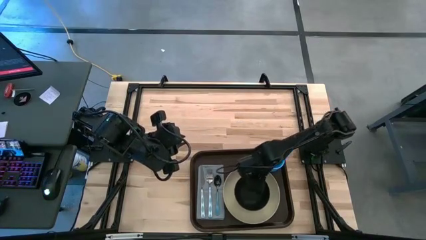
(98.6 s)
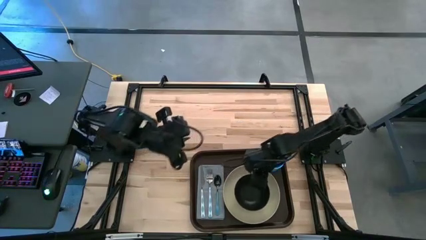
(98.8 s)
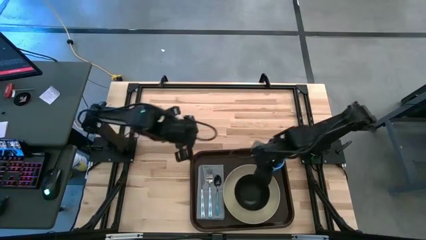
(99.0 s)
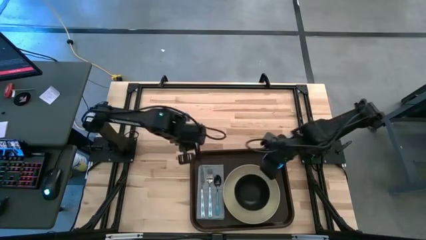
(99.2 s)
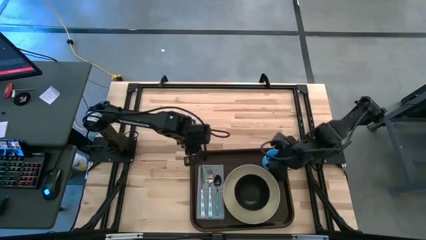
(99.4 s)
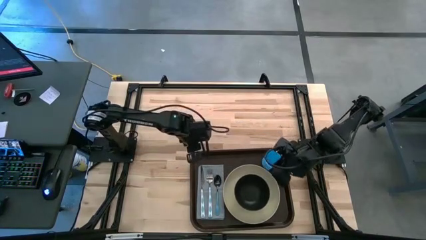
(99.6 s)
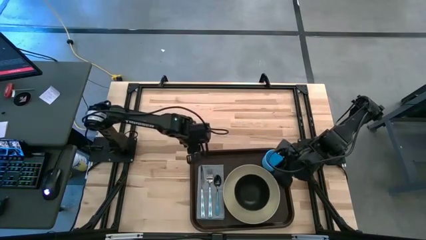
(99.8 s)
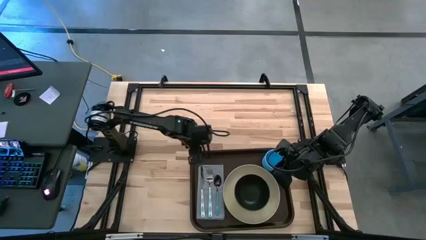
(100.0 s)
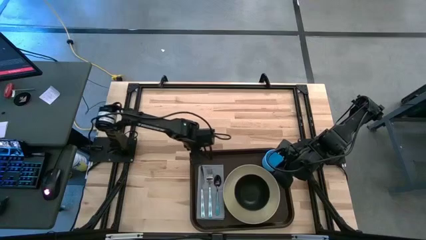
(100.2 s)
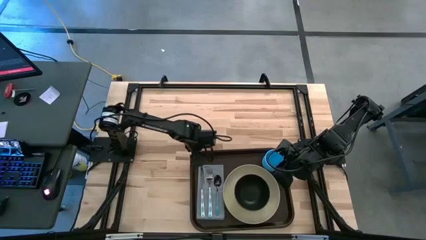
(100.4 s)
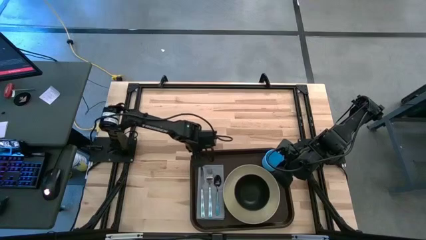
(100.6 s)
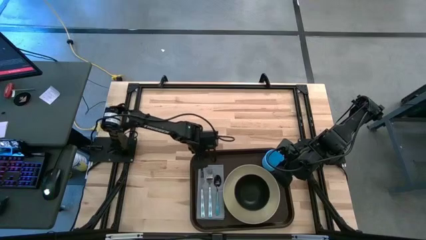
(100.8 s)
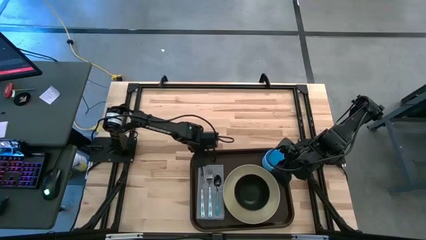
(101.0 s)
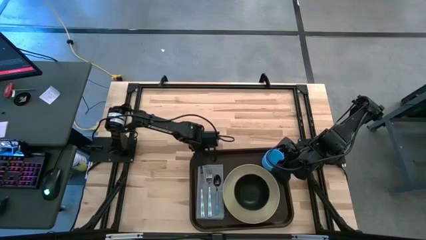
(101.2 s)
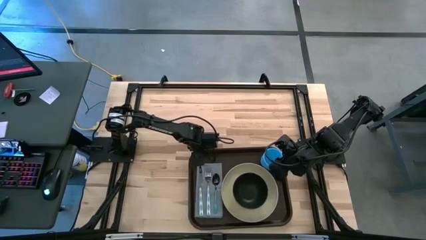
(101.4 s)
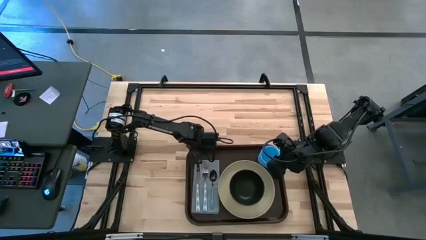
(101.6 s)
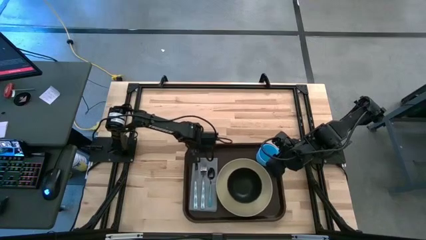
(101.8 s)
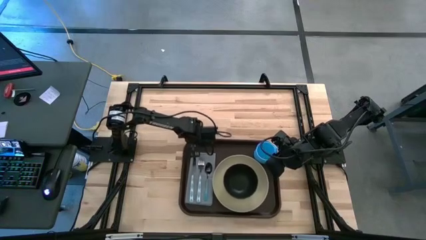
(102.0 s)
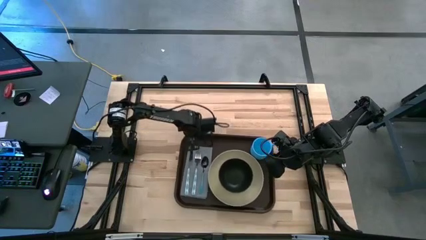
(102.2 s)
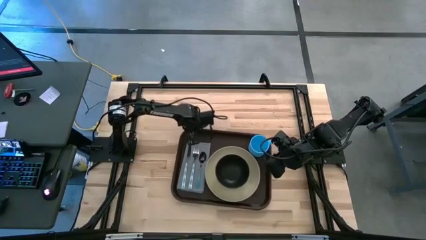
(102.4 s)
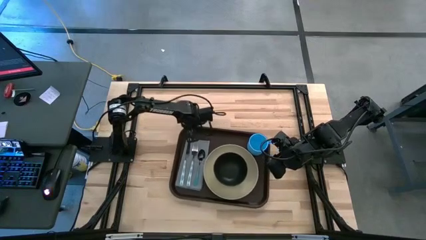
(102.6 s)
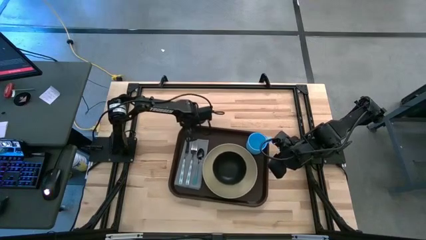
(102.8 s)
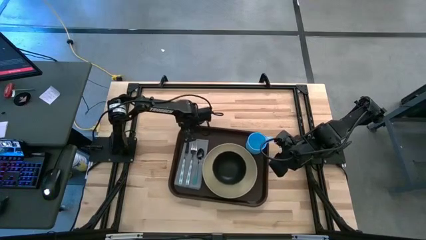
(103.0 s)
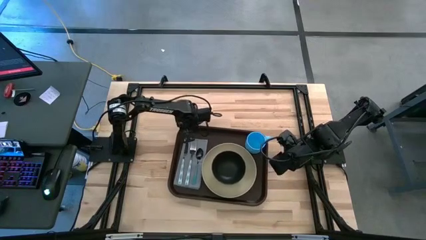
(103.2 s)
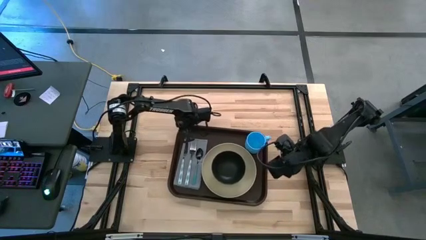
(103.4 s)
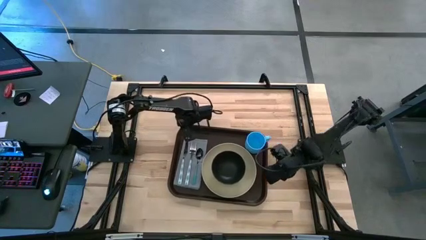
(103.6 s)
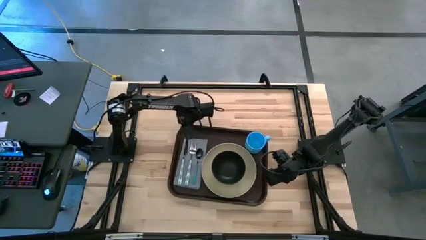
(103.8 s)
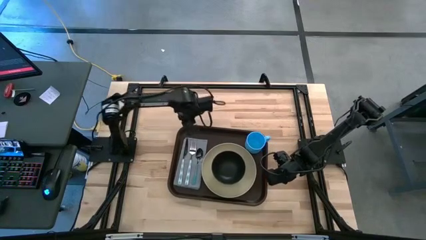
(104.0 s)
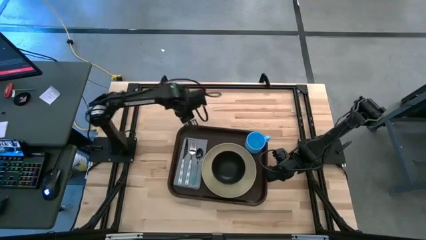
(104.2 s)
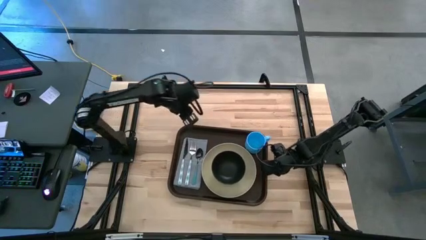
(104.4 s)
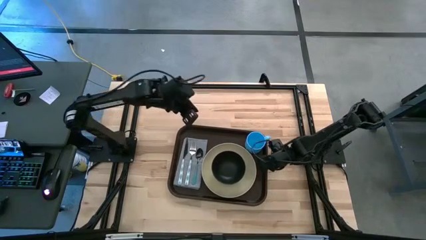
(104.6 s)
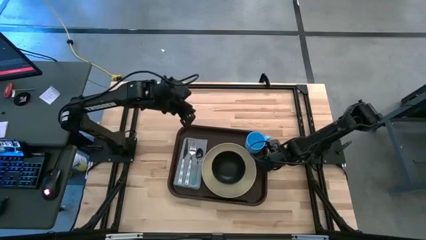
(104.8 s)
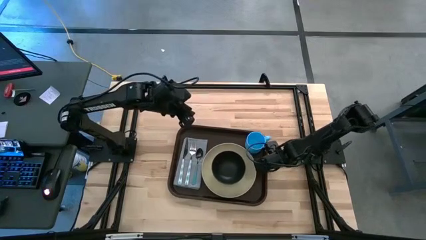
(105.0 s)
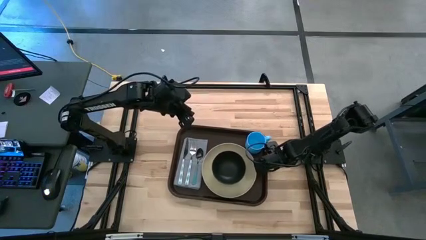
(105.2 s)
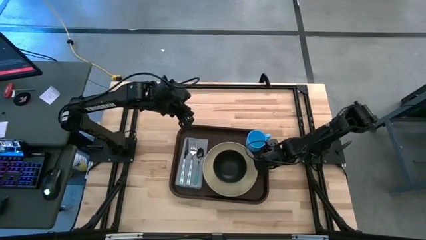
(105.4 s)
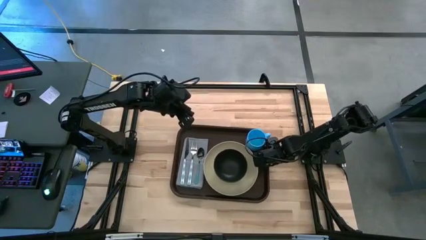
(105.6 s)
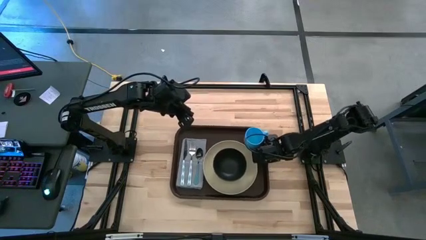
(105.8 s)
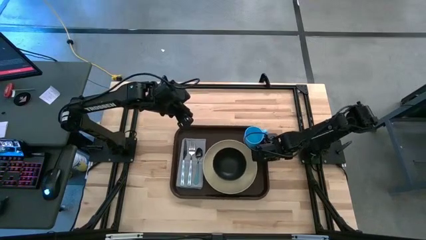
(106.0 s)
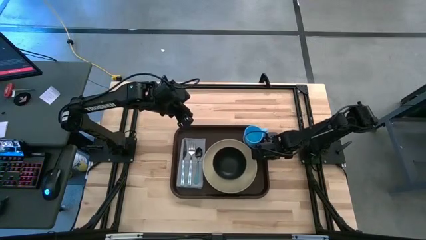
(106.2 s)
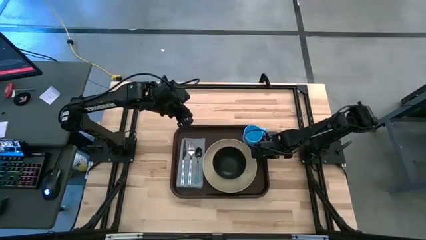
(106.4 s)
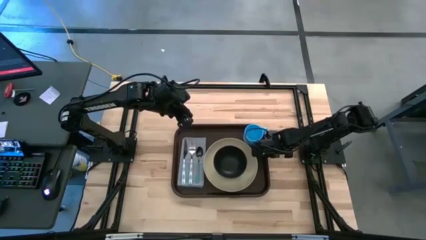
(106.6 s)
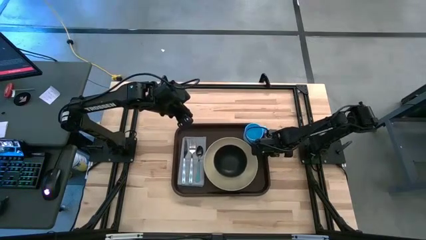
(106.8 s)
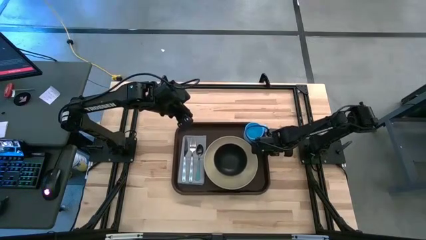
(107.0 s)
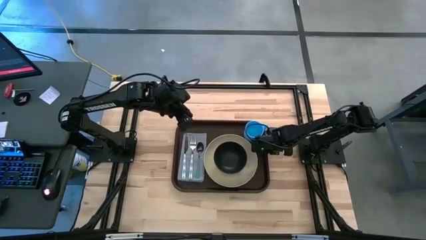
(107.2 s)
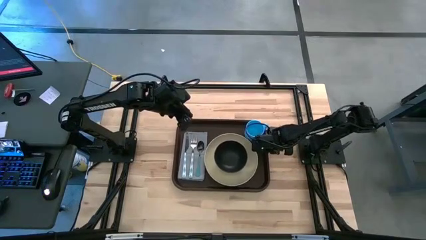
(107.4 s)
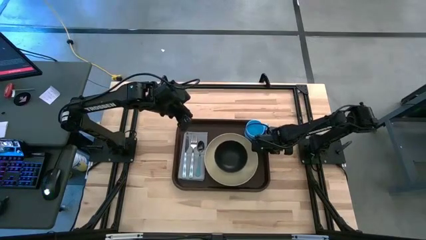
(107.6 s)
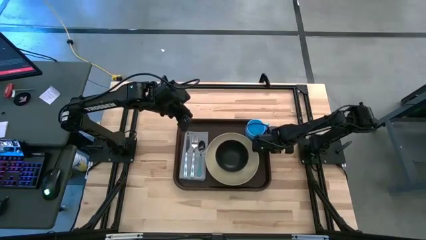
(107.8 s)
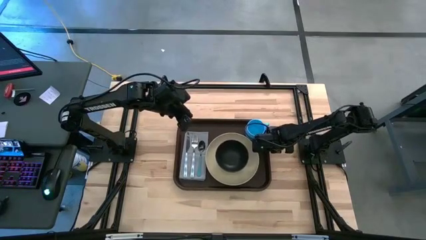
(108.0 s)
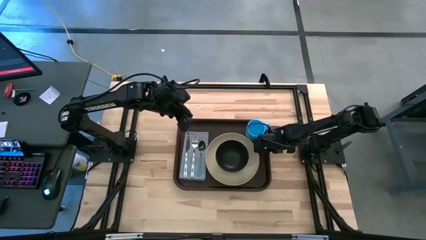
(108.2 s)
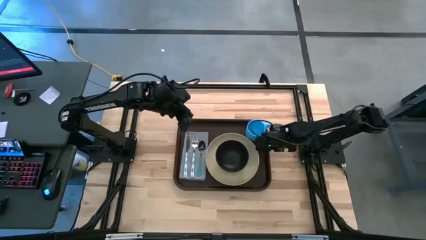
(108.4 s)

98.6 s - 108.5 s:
Task: Set up tray
Move the brown tray to the center of the table
